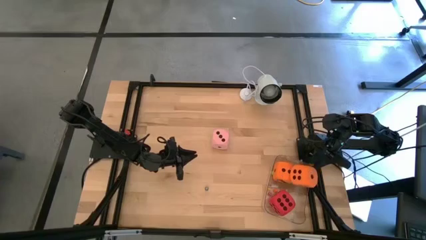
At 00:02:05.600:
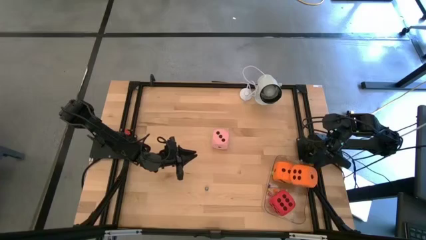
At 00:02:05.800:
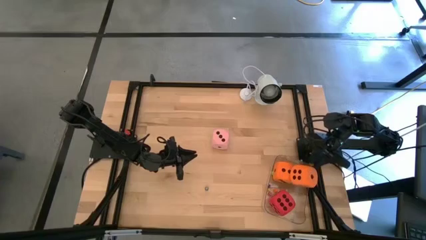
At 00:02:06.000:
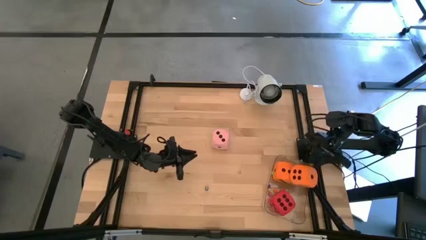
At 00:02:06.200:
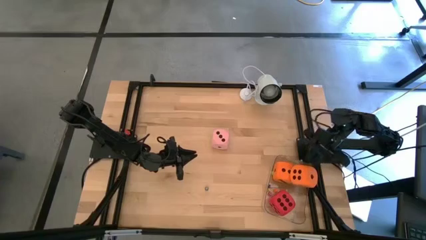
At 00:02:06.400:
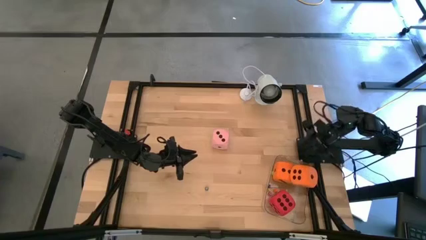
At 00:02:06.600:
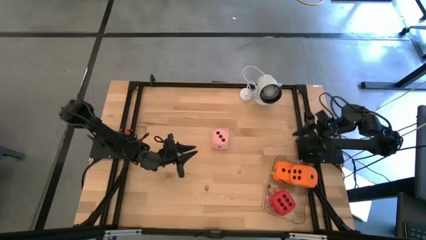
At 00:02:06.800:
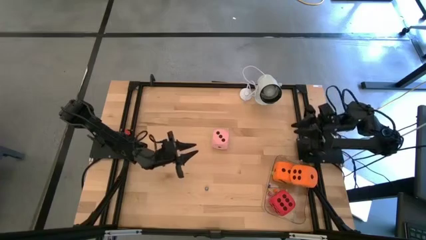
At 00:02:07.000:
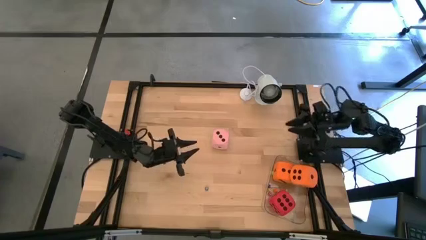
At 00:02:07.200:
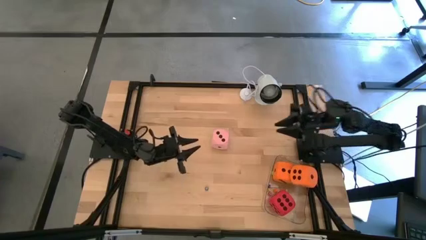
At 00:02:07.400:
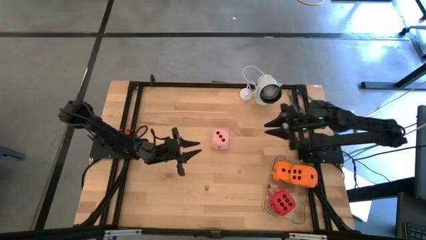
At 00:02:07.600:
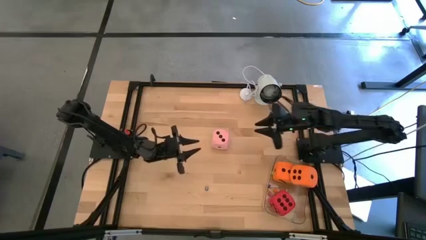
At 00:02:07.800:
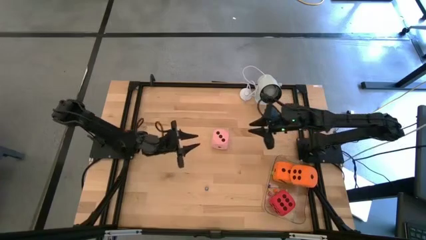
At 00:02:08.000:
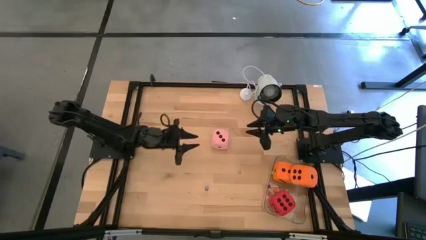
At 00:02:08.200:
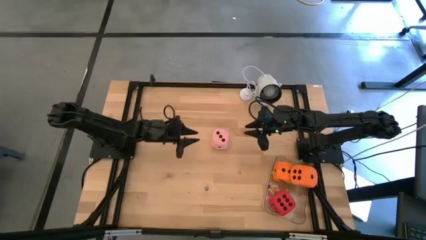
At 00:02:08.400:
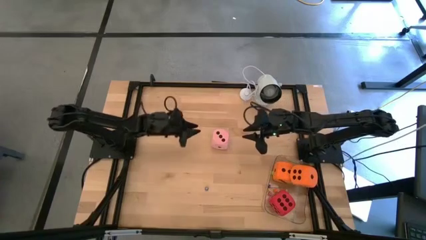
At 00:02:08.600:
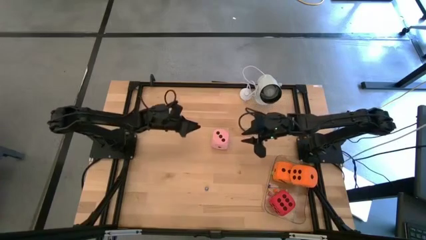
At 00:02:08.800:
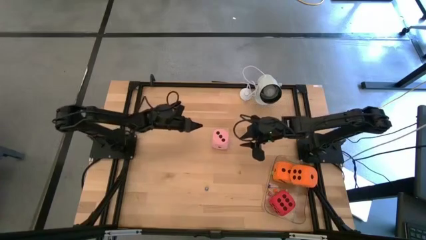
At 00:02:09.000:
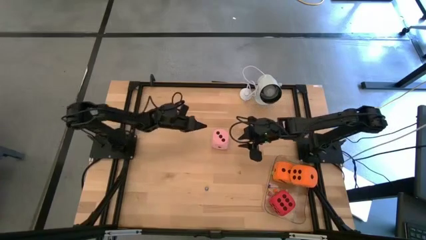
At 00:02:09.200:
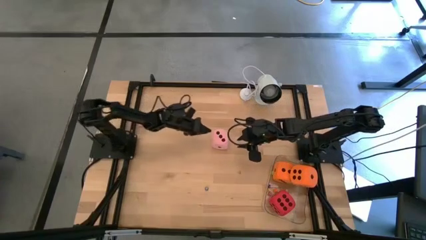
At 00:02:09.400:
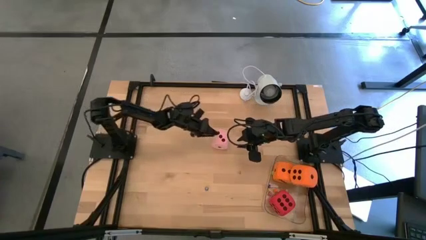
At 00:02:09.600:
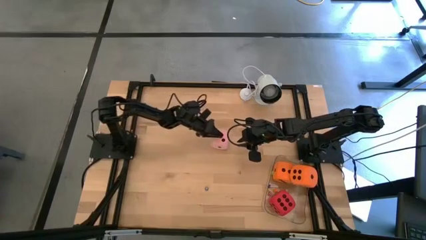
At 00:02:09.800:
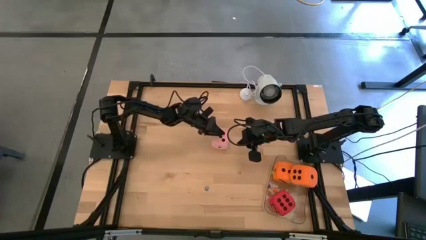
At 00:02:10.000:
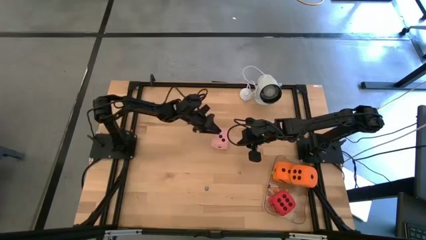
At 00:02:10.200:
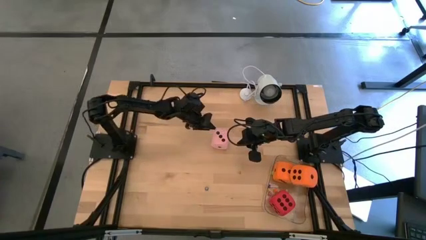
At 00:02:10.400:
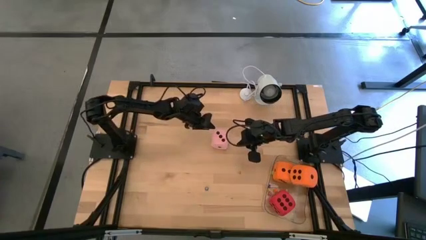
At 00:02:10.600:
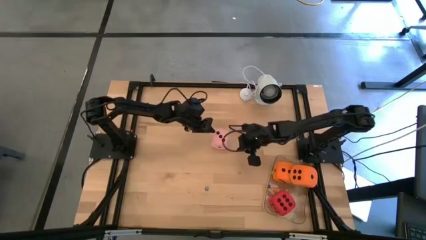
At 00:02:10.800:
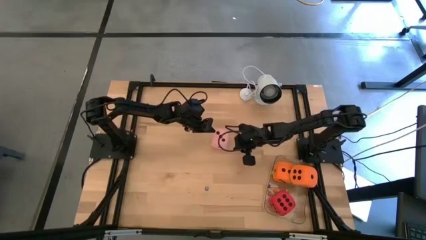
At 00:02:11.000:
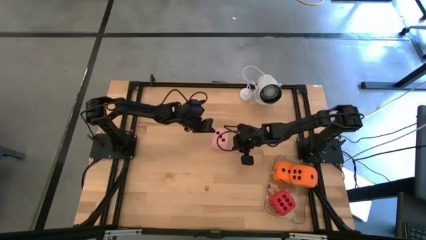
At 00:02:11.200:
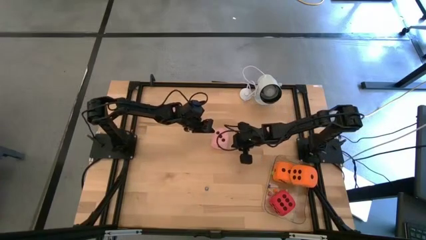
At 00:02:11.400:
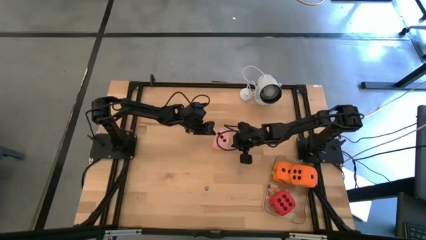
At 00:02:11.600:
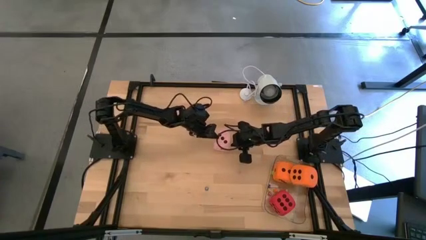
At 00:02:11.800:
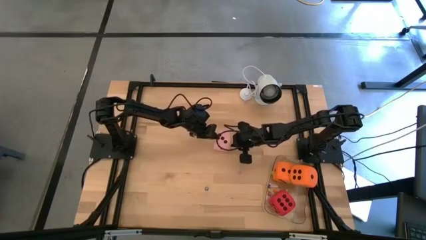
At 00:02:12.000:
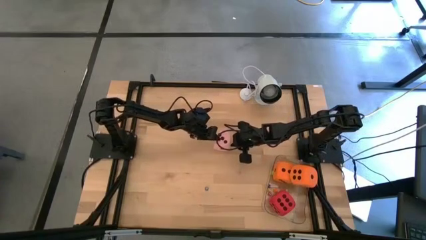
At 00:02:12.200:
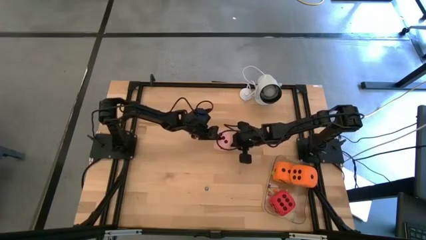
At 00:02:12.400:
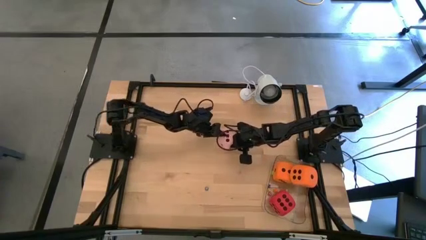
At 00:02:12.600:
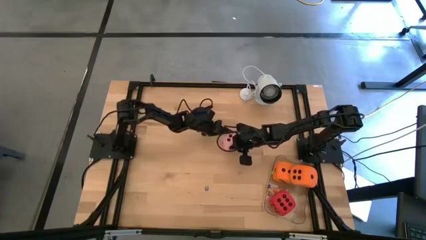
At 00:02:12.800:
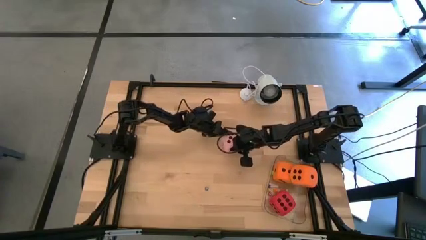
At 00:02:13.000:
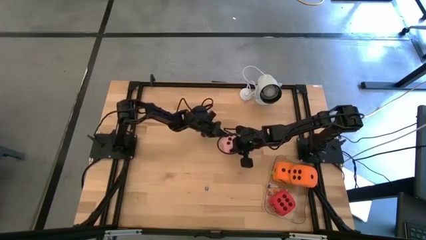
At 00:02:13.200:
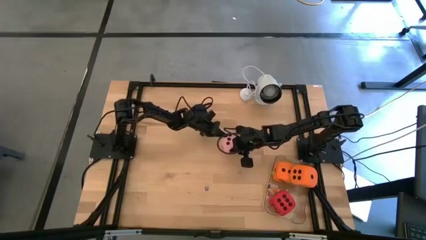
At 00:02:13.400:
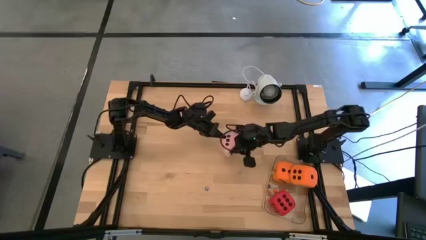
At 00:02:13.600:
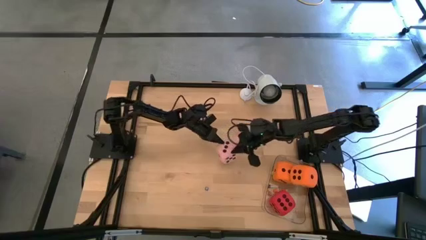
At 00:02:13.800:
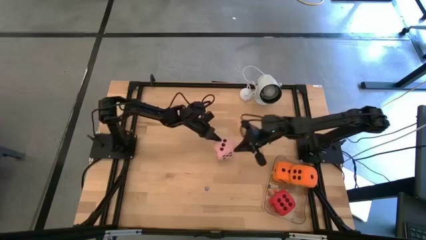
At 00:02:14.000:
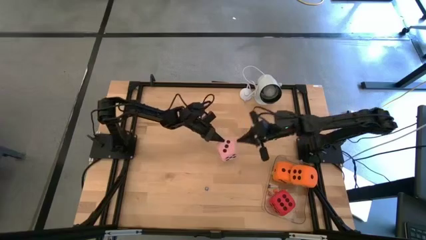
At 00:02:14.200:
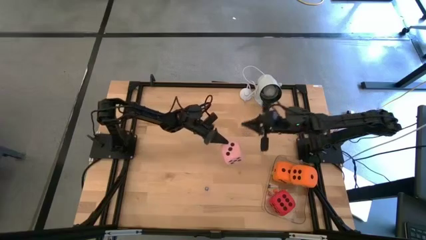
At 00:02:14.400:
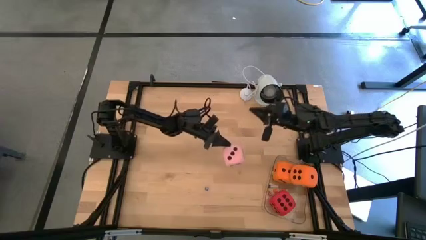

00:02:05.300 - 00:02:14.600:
Task: Pick & Place Dice
Put the large pink die into the transparent container

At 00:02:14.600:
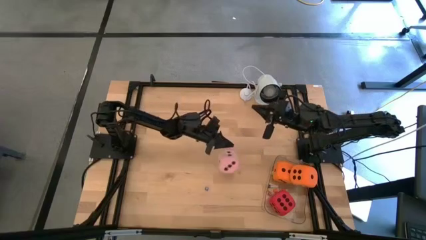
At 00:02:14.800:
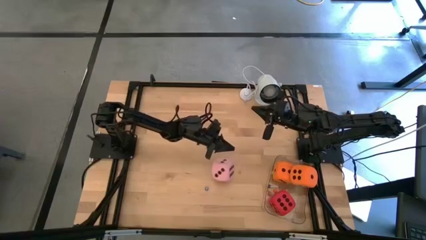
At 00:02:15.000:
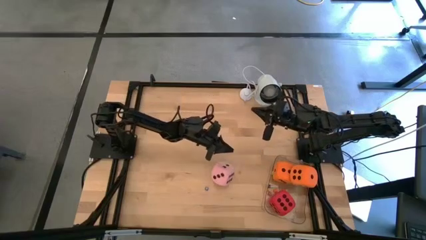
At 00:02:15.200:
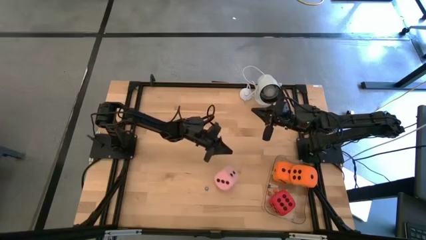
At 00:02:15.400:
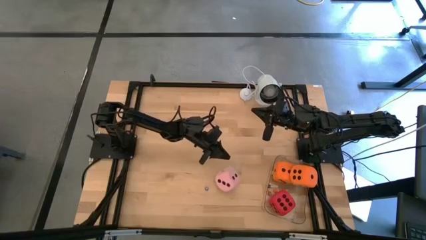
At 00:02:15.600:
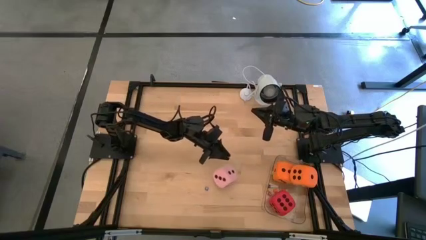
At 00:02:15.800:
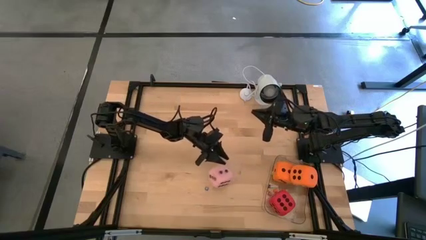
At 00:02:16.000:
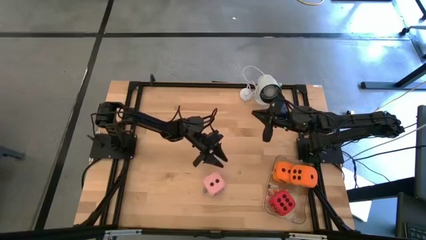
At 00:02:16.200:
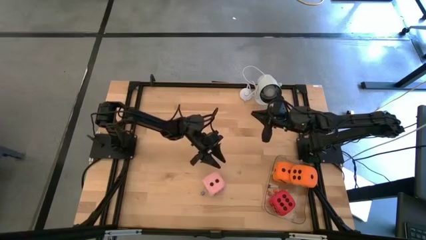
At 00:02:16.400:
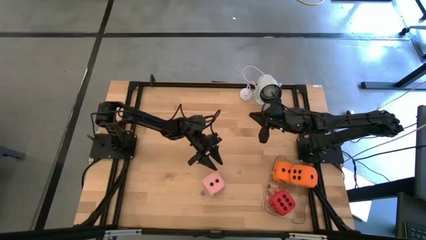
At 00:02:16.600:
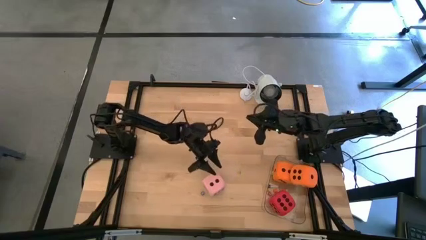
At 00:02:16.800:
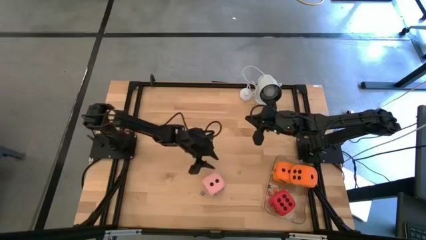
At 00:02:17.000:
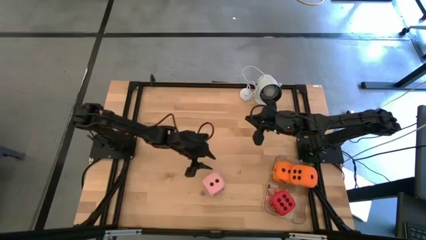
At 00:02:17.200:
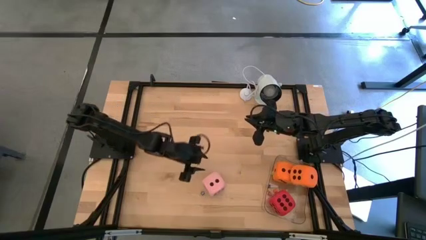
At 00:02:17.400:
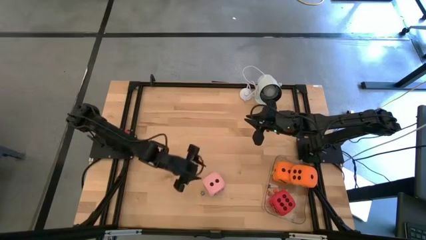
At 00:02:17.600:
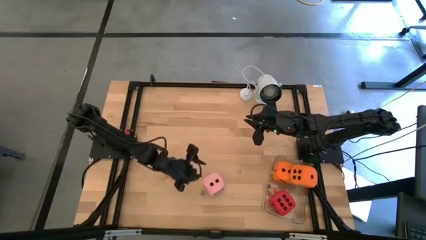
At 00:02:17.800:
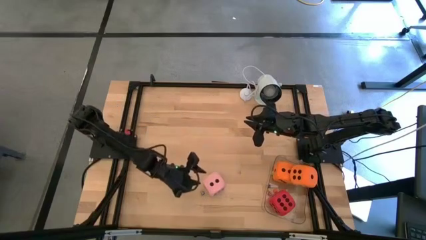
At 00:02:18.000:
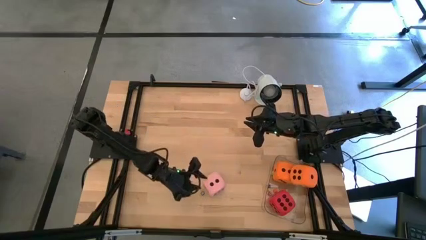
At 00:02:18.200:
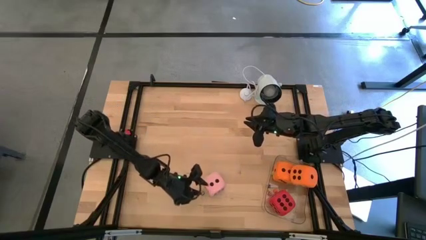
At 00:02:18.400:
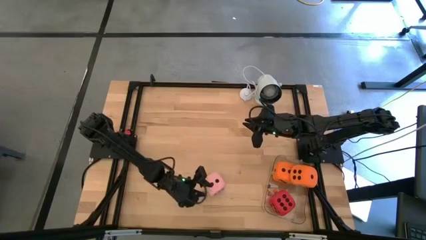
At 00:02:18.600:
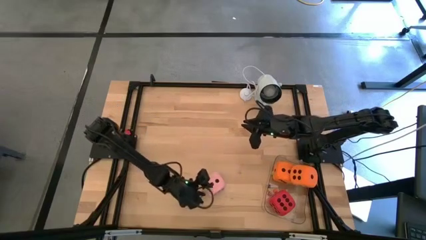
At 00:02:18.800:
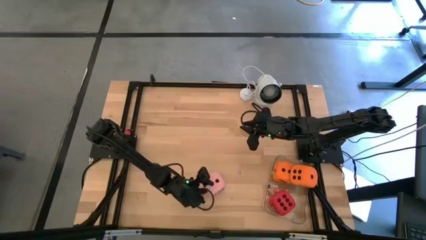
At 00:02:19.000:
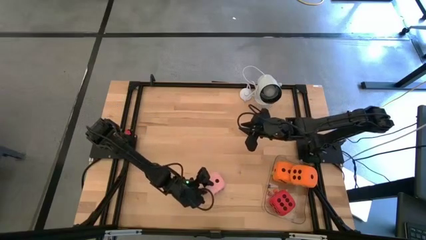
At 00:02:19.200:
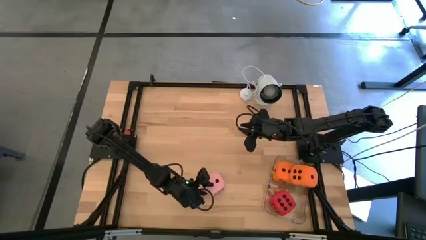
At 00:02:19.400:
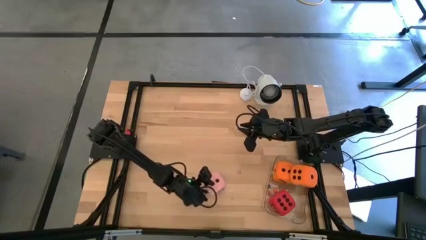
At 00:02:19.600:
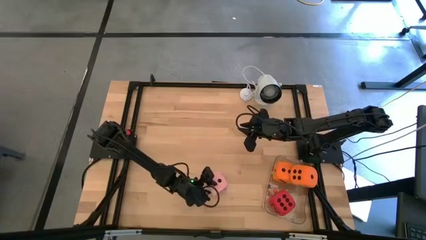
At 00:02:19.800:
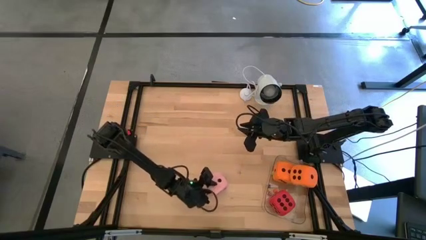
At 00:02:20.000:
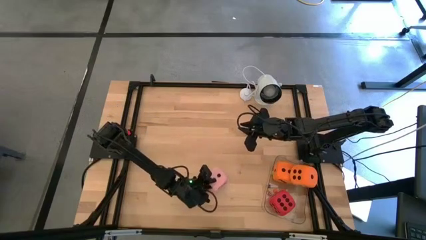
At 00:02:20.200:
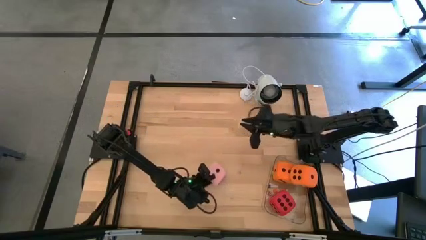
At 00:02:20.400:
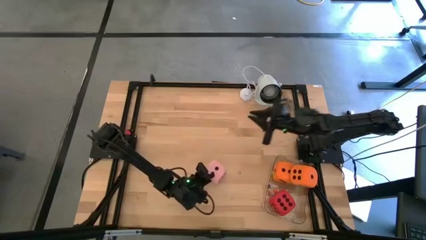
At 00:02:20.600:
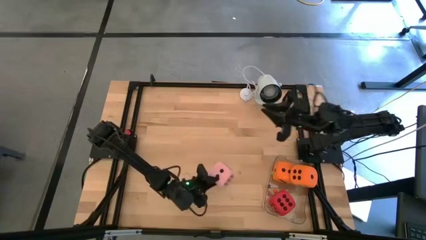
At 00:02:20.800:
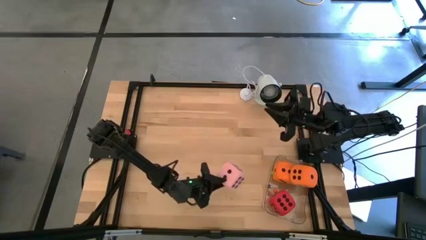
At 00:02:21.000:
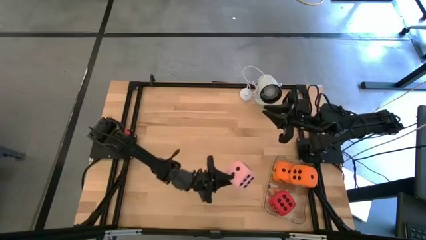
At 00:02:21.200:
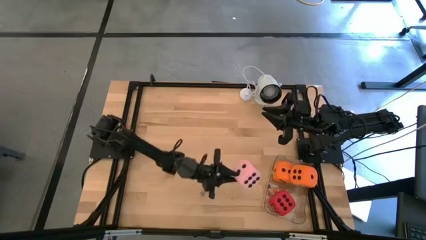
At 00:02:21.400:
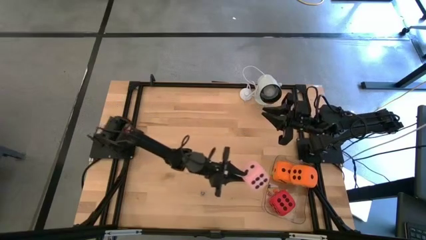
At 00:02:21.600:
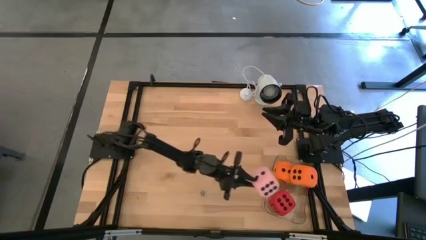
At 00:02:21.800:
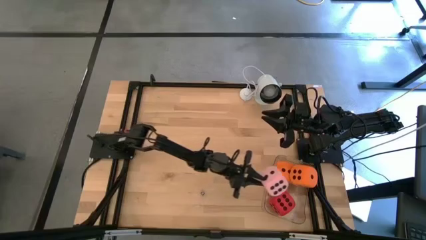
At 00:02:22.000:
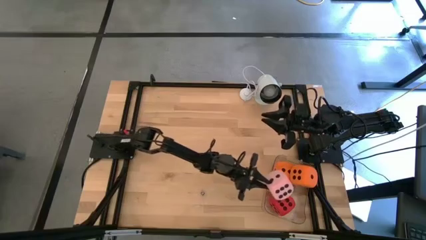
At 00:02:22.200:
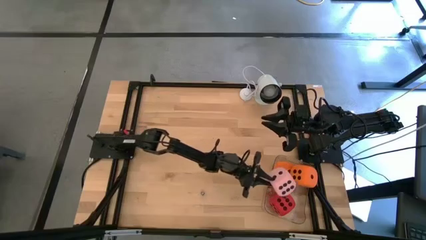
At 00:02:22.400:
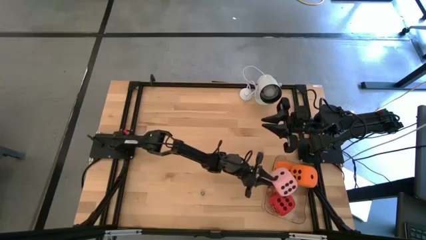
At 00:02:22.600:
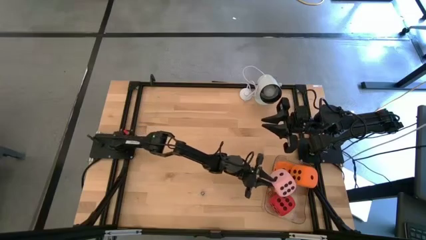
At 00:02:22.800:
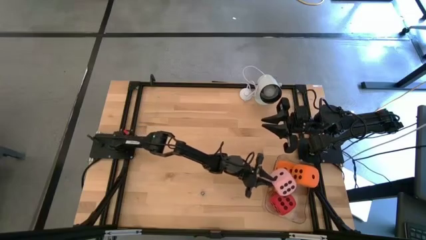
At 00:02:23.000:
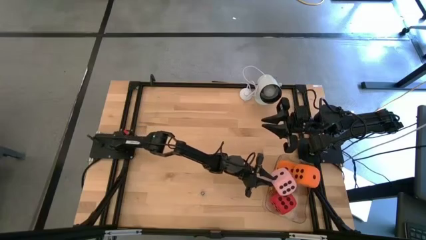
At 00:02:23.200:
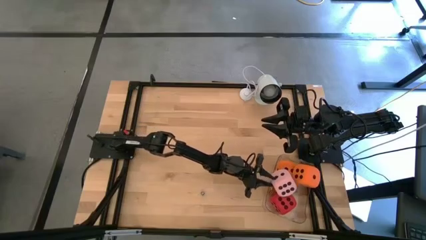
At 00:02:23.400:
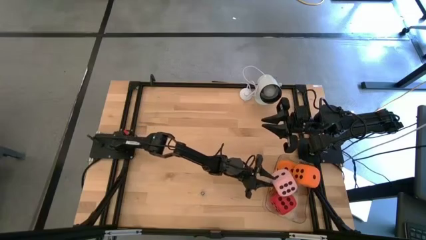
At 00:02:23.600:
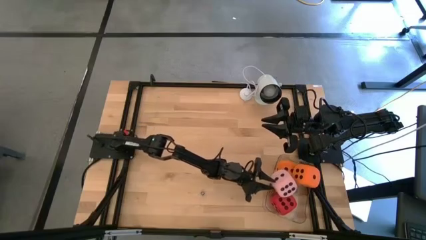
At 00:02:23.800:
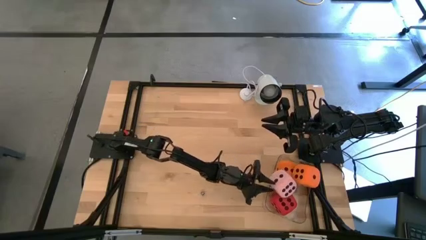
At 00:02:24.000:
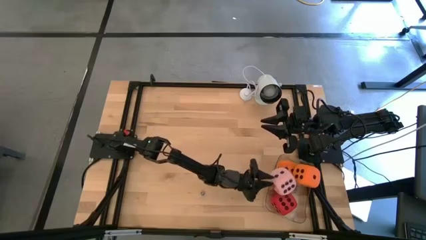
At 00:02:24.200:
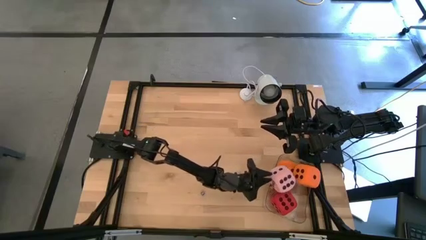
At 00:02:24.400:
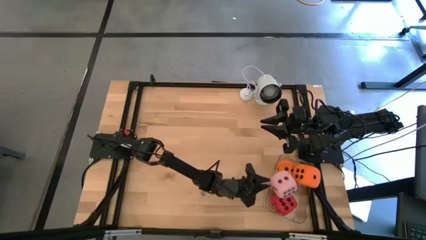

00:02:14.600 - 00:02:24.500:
Put the large pink die into the transparent container
